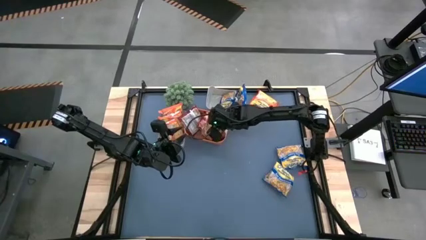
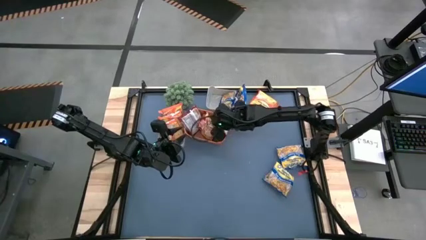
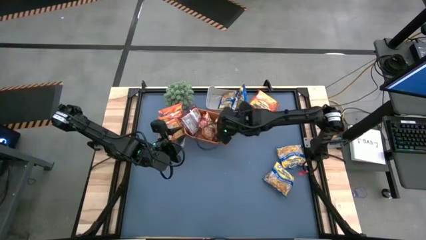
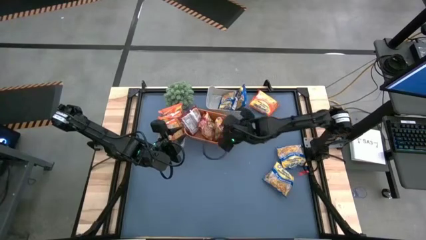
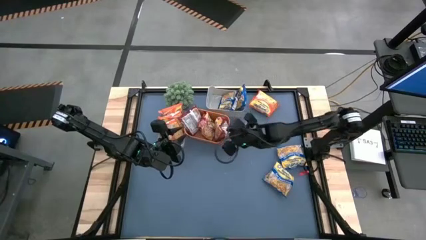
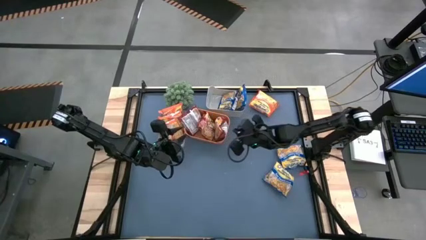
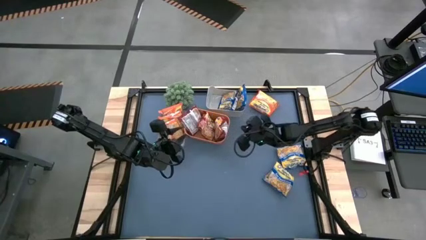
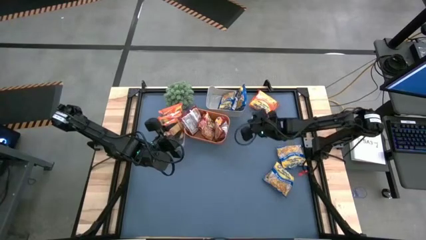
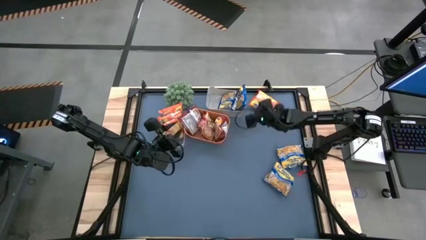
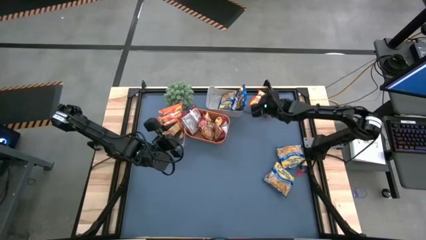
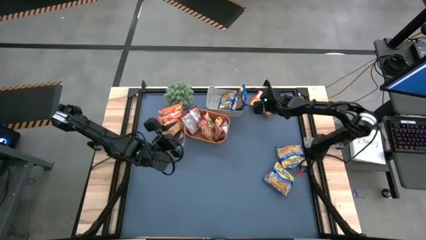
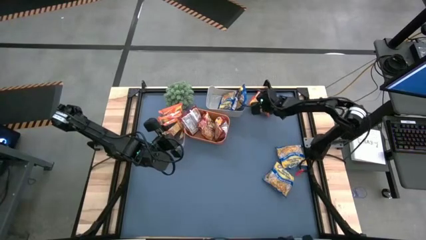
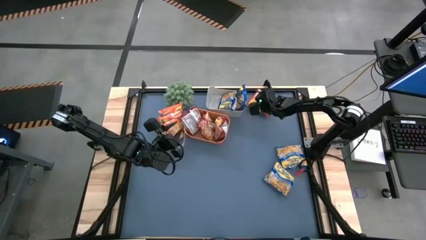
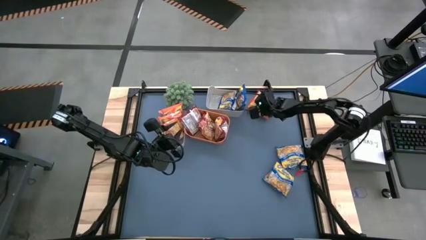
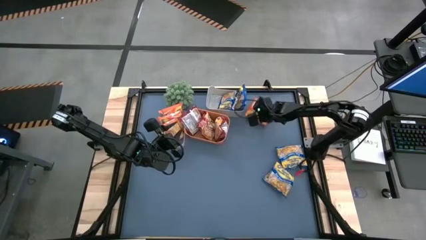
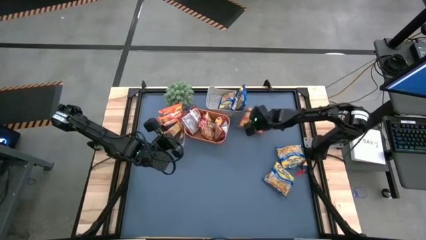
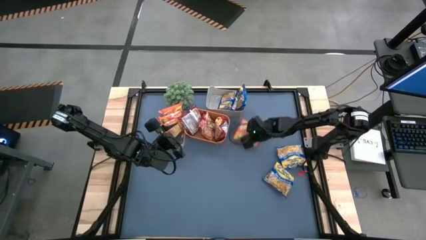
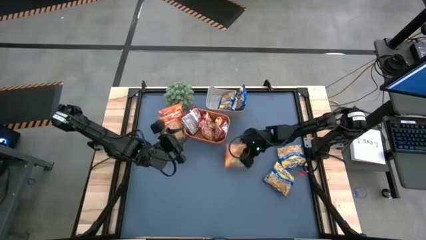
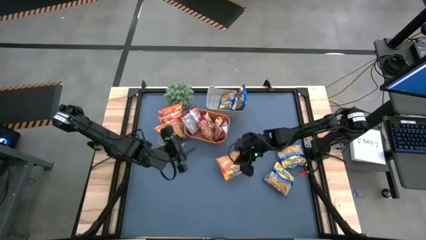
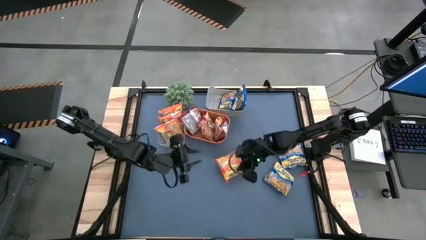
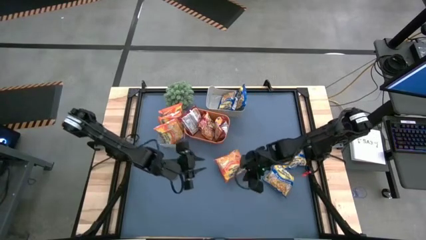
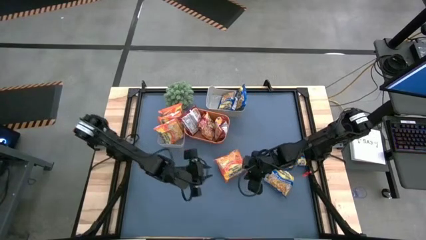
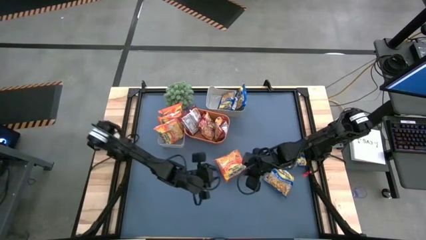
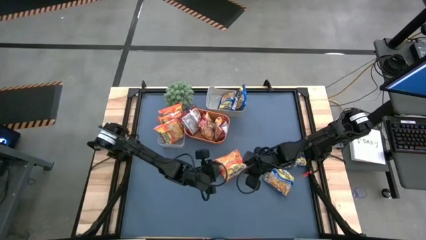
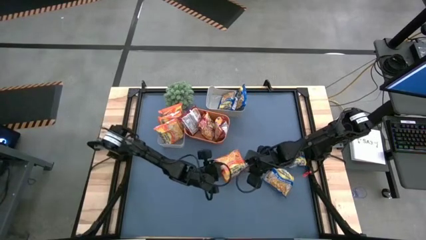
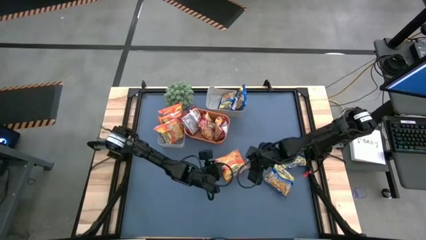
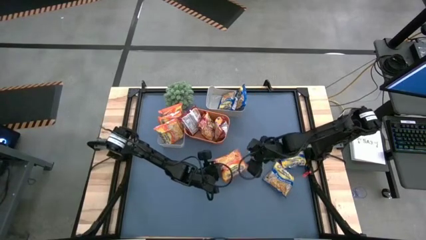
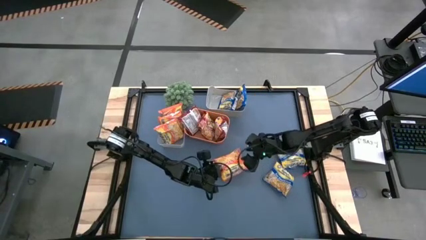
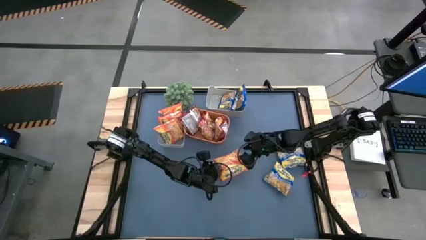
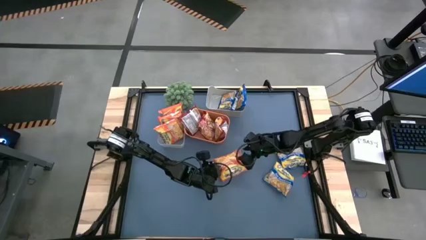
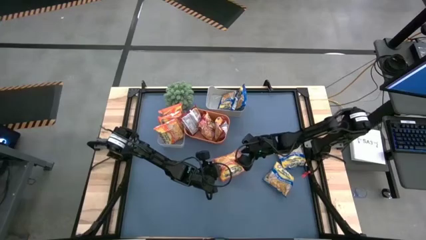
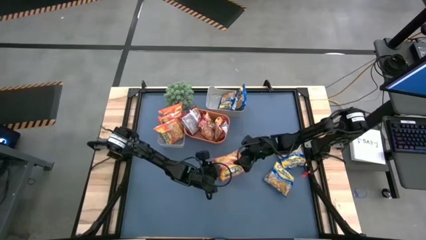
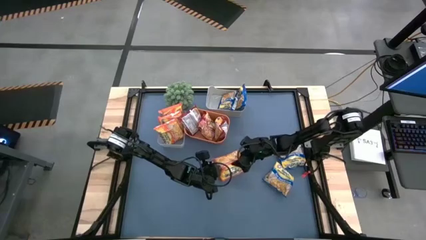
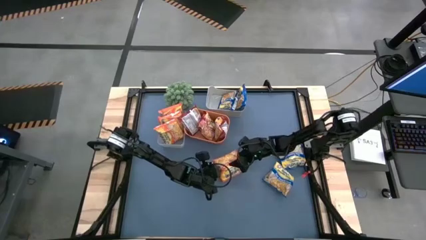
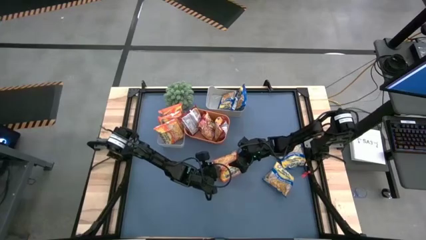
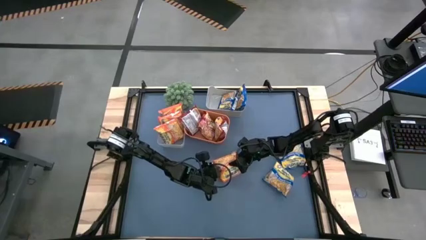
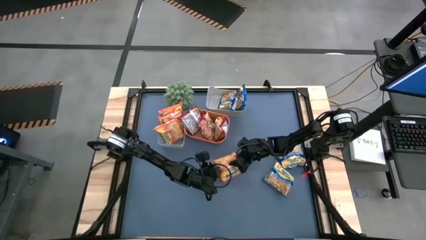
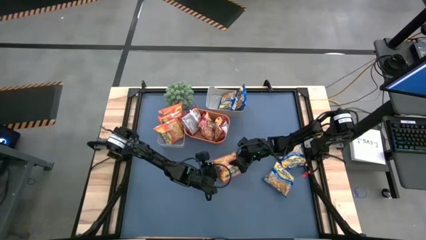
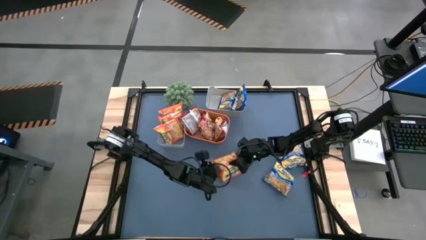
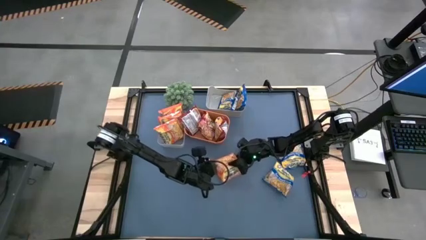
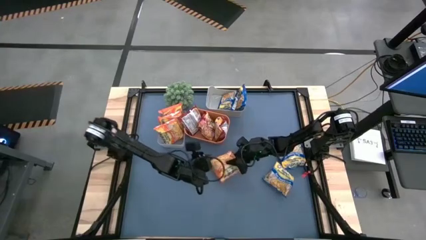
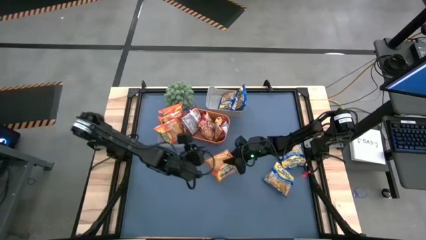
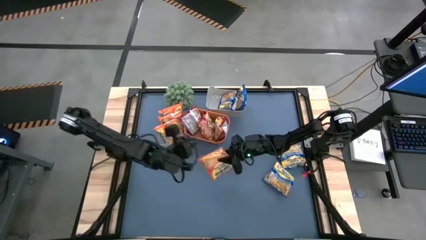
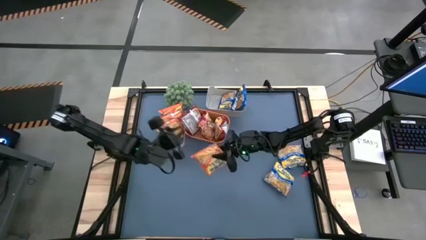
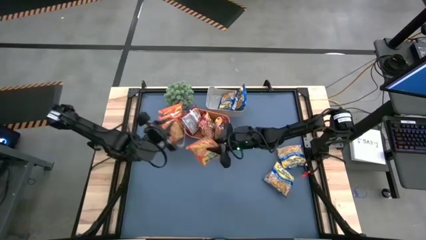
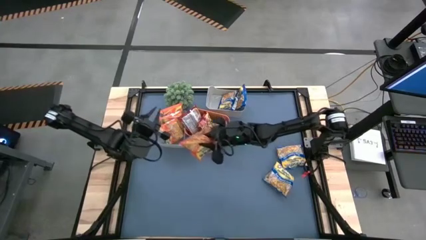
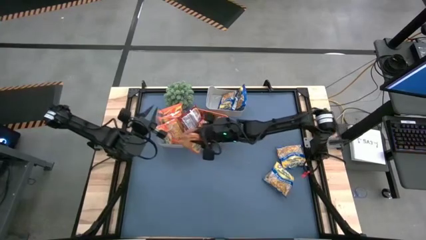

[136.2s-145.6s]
Task: Sort Maruchan noodles
Put the orange noodle pack into the transparent bin

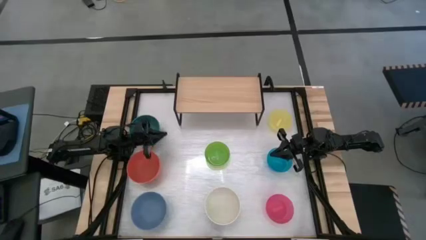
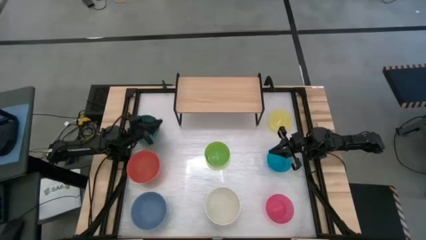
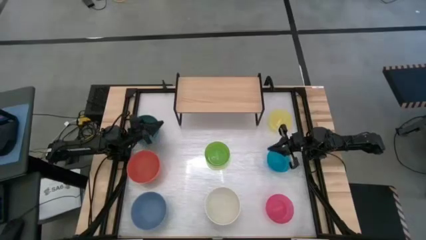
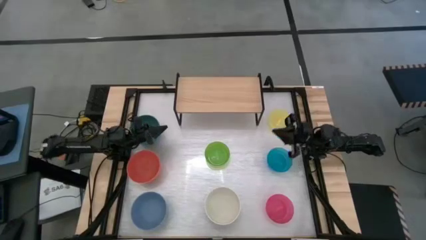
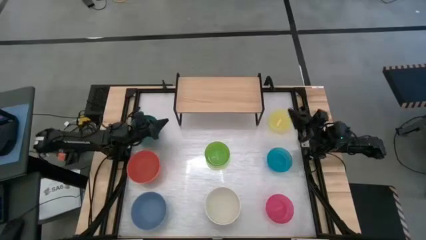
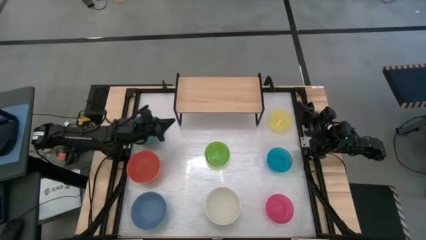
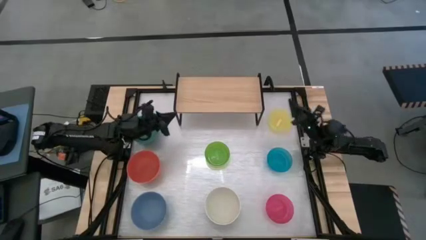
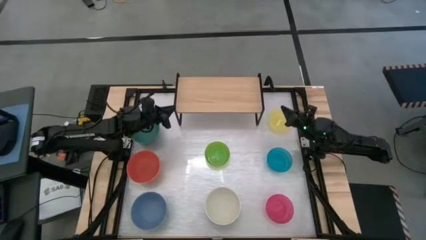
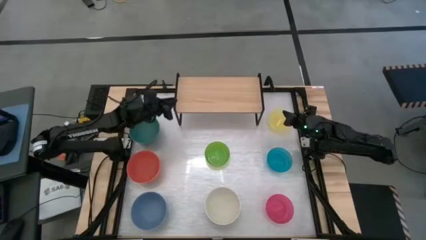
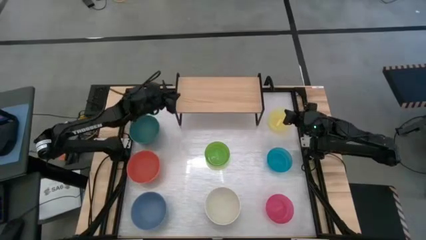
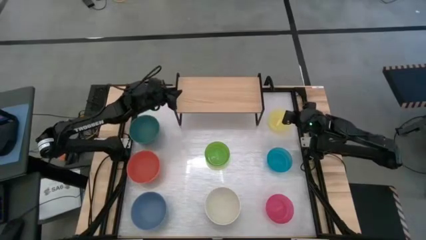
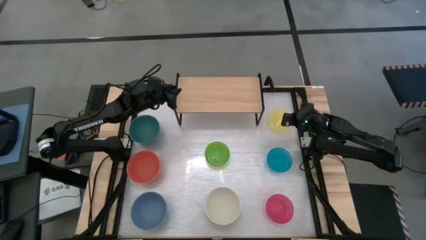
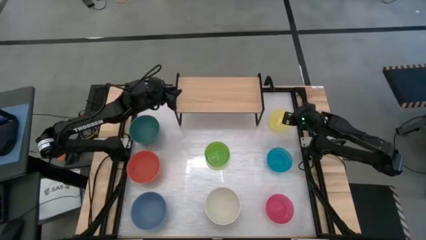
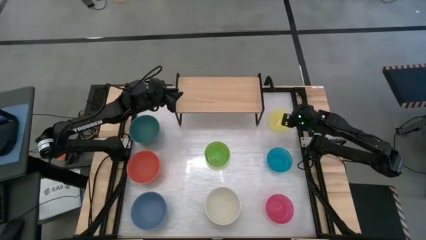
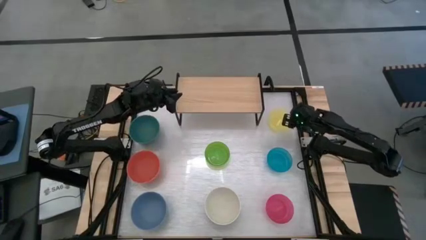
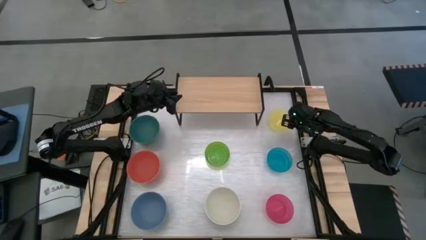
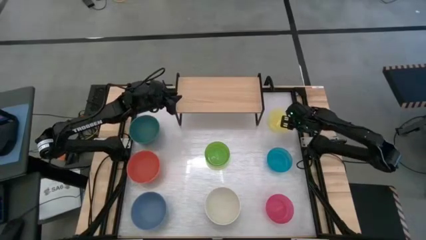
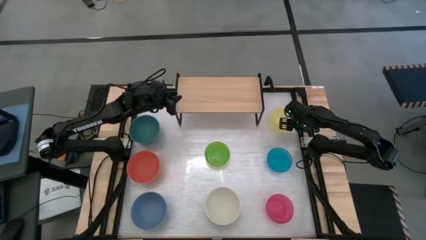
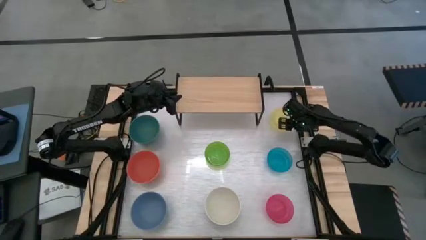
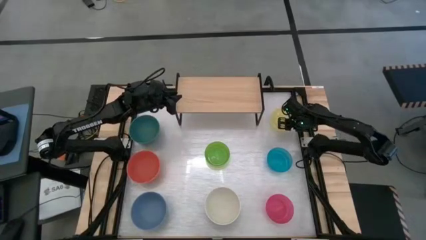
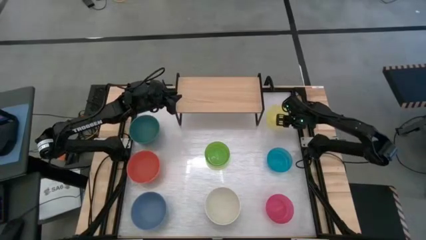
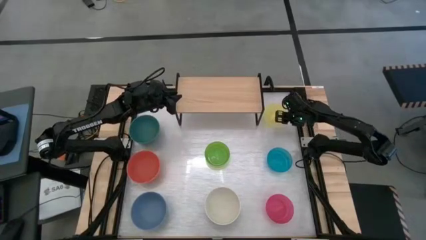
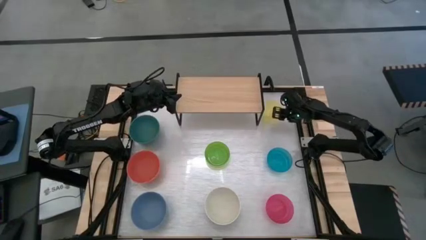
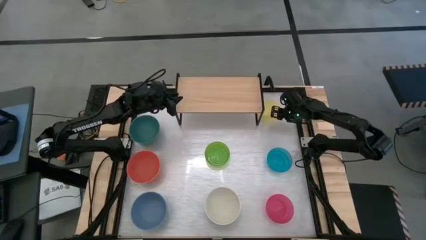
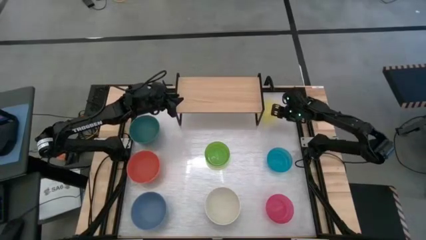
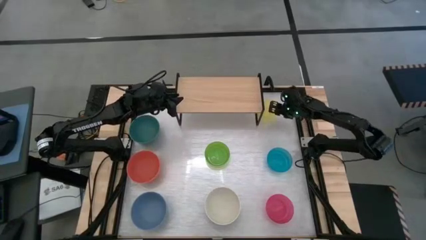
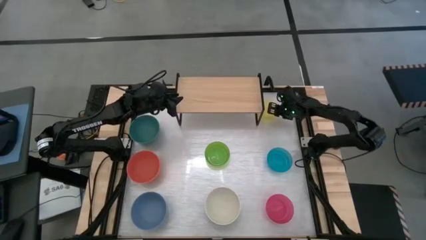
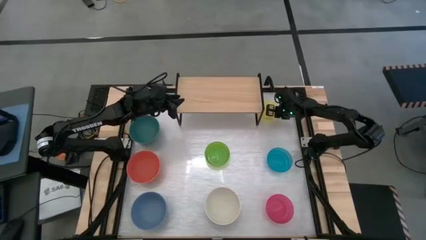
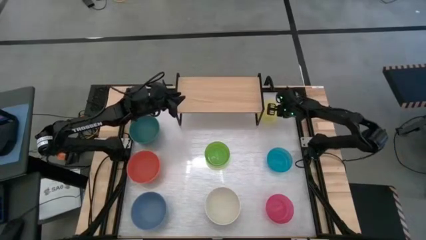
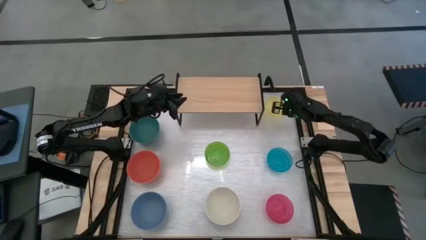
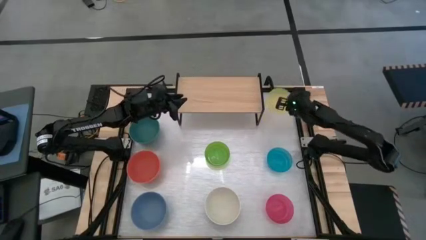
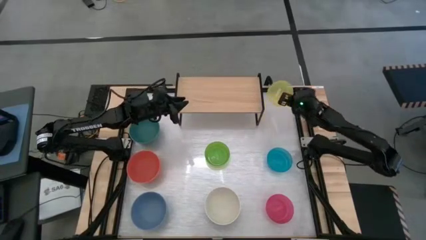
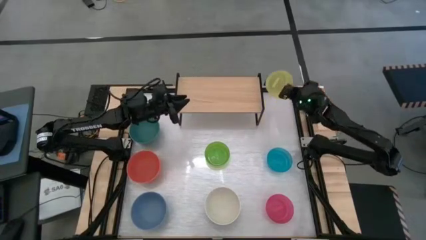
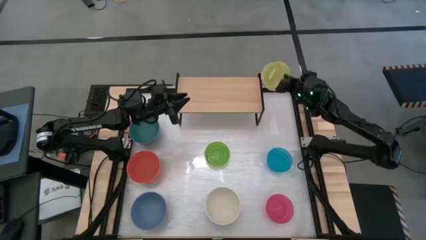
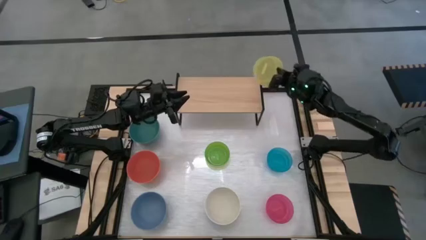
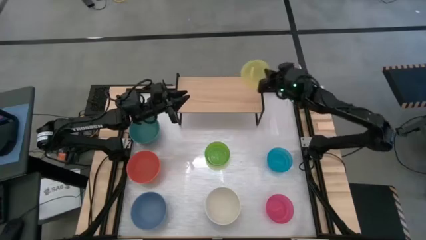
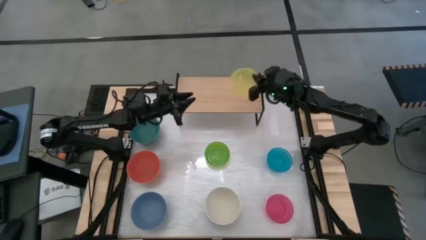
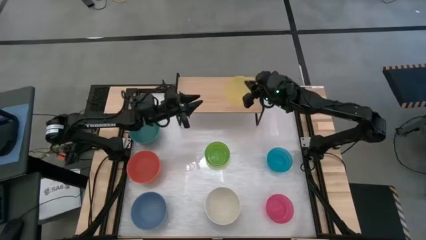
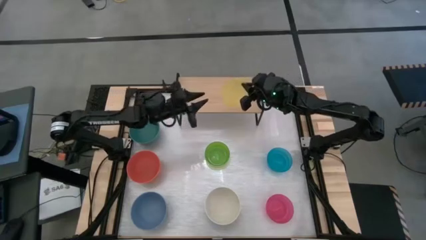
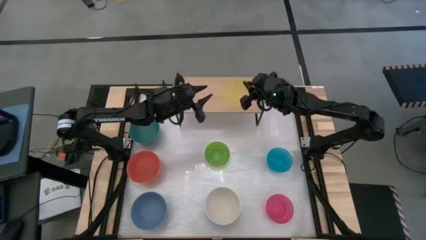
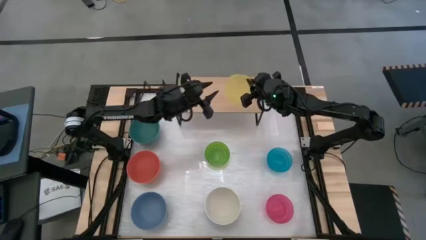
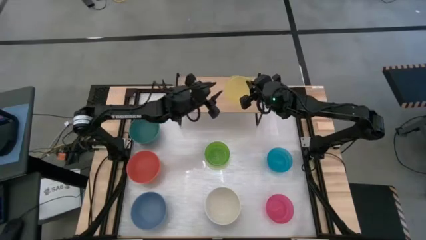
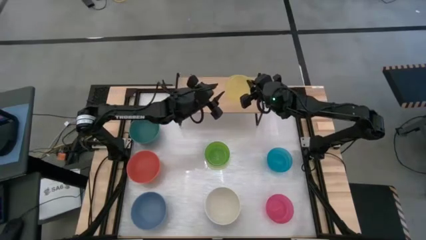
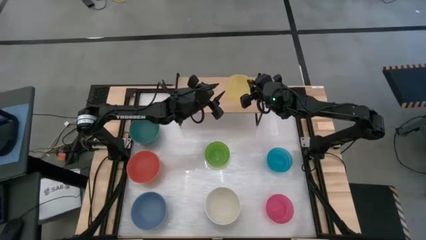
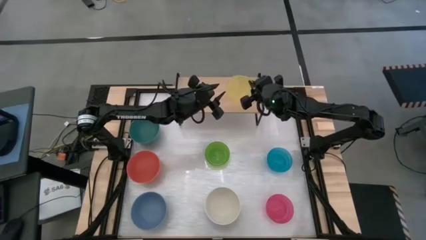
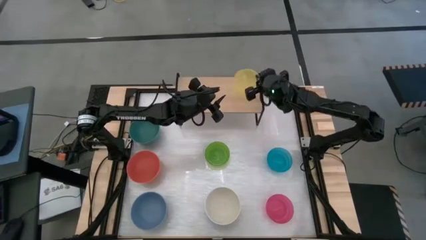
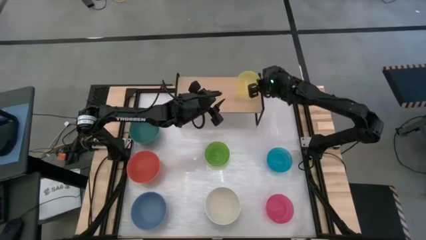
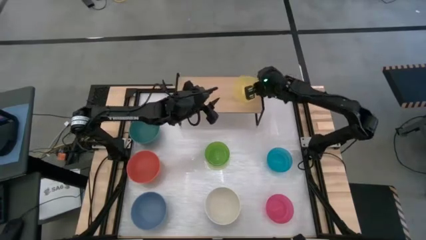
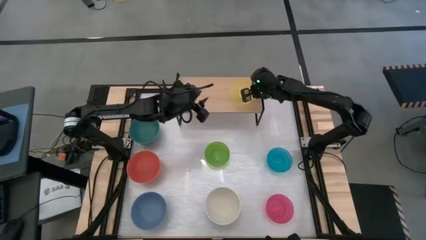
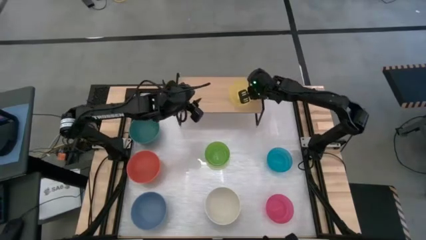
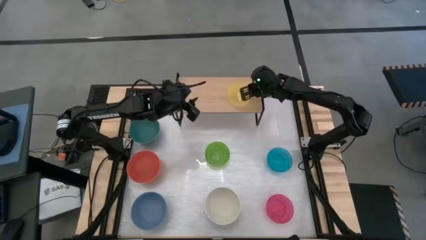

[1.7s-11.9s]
Task: Place and stack bowls onto a shelf
Put the yellow bowl on the shelf
